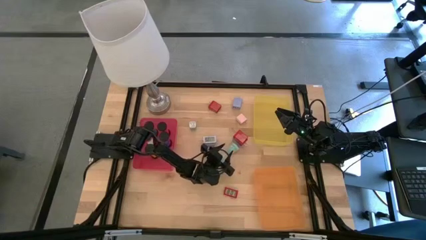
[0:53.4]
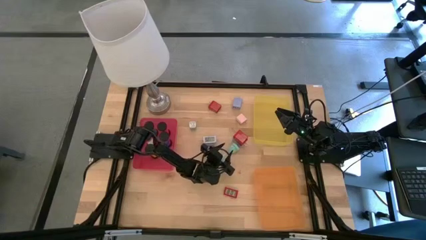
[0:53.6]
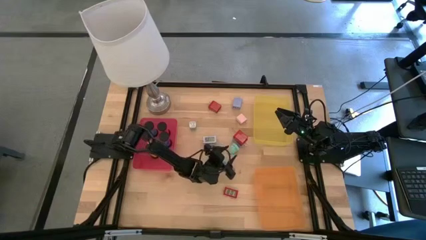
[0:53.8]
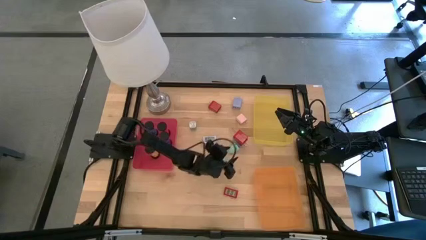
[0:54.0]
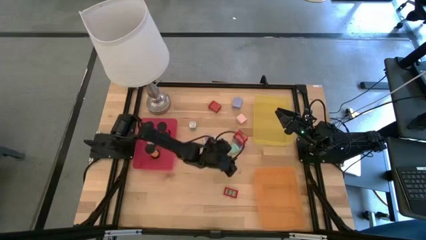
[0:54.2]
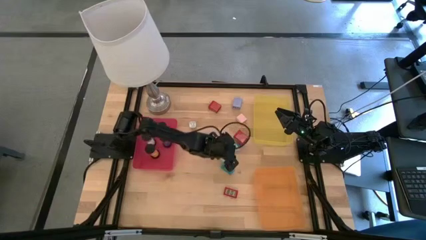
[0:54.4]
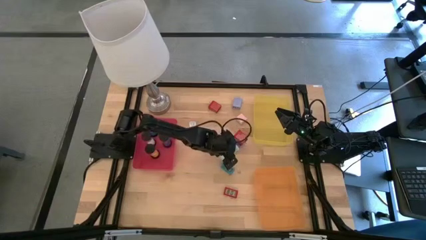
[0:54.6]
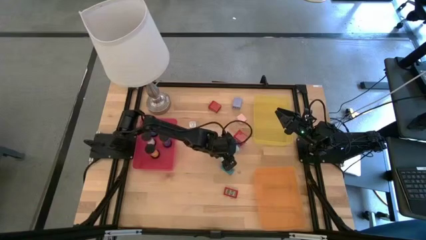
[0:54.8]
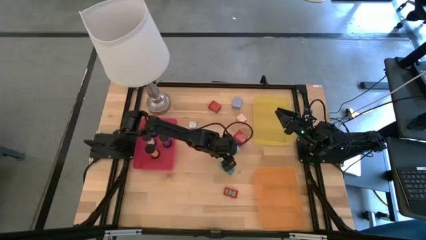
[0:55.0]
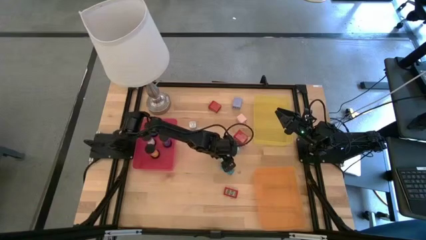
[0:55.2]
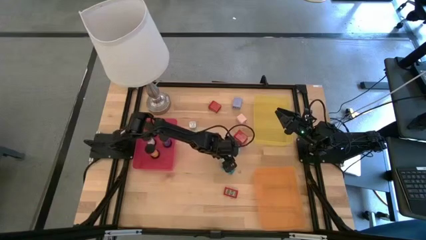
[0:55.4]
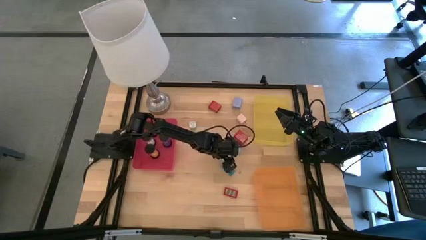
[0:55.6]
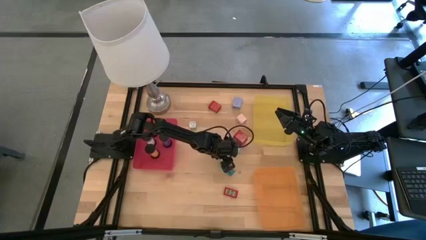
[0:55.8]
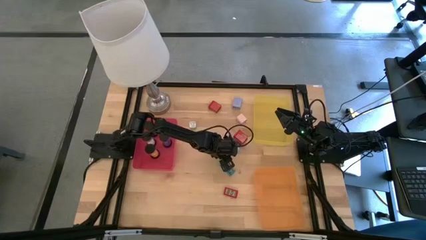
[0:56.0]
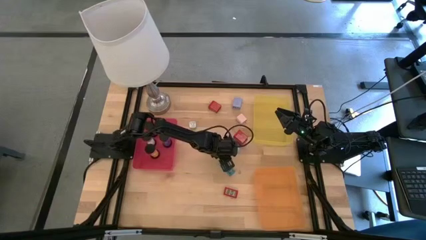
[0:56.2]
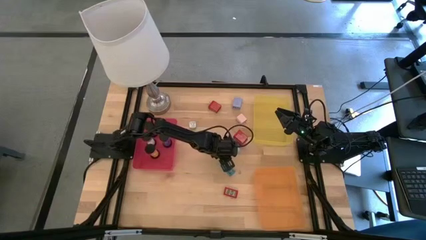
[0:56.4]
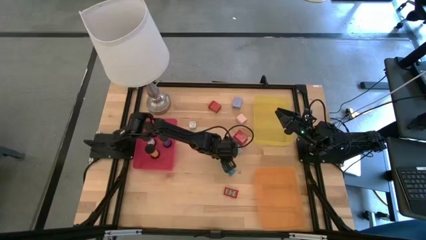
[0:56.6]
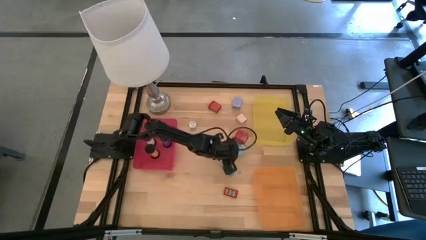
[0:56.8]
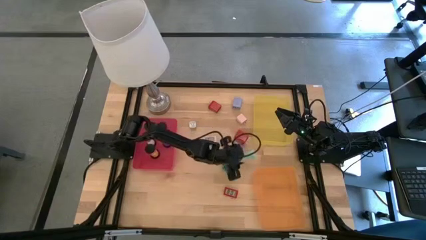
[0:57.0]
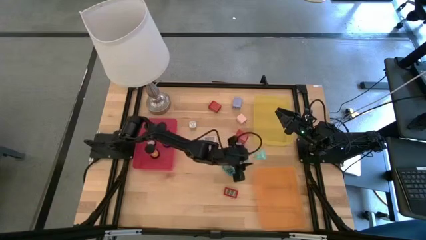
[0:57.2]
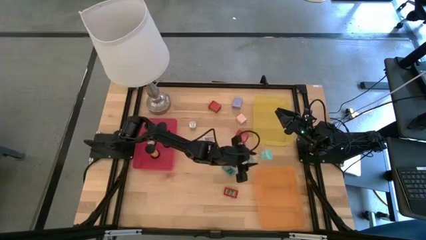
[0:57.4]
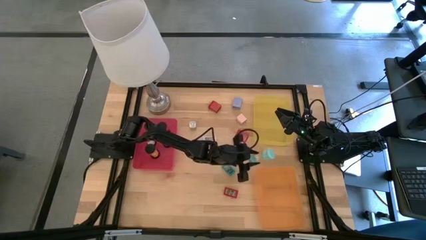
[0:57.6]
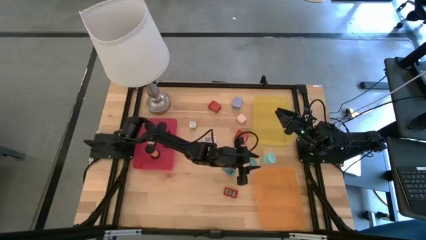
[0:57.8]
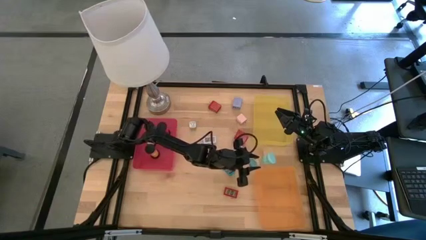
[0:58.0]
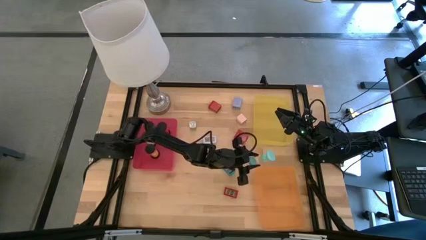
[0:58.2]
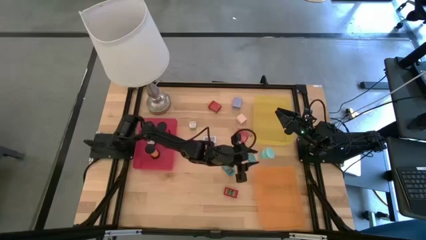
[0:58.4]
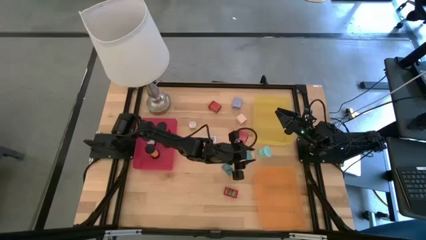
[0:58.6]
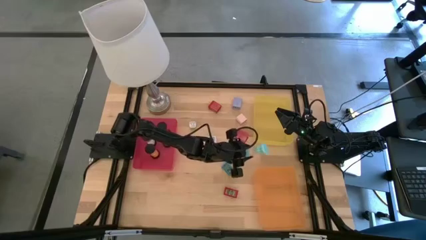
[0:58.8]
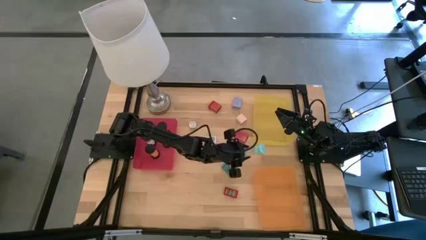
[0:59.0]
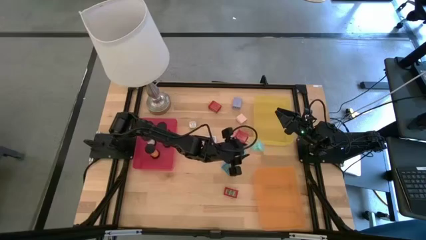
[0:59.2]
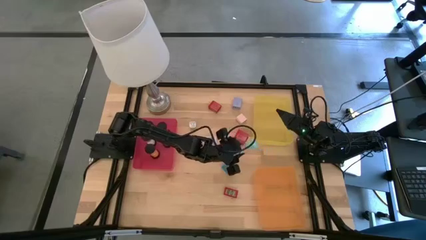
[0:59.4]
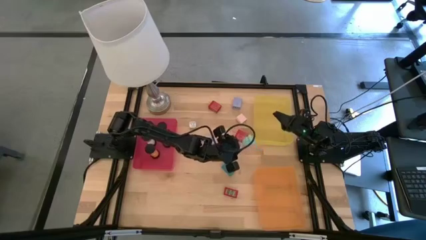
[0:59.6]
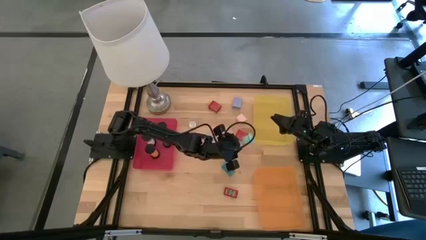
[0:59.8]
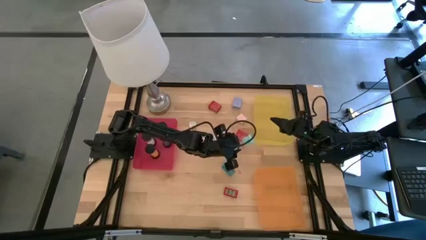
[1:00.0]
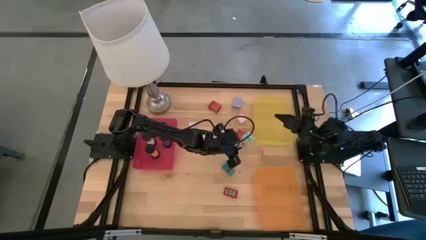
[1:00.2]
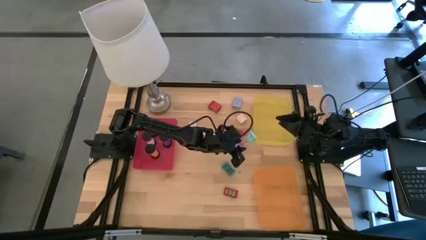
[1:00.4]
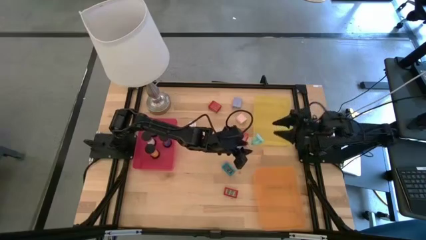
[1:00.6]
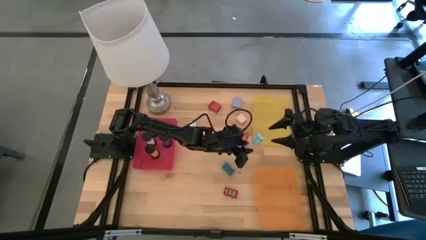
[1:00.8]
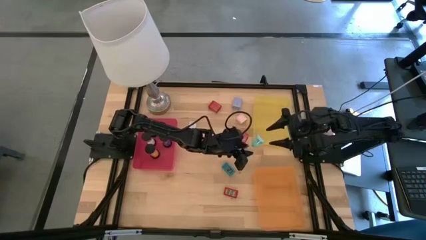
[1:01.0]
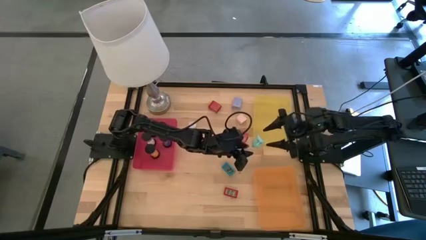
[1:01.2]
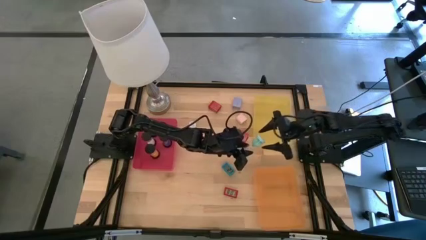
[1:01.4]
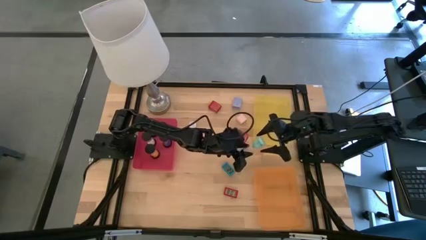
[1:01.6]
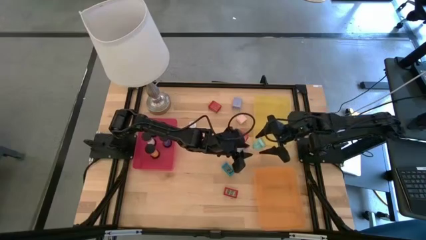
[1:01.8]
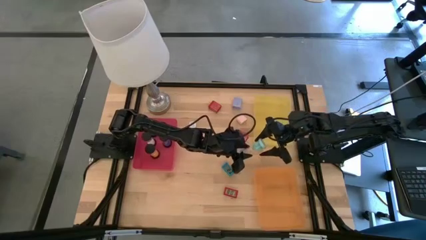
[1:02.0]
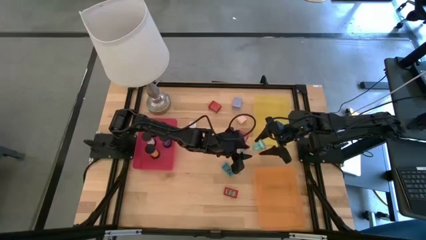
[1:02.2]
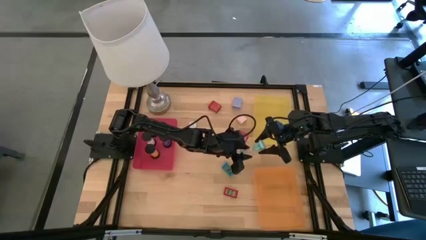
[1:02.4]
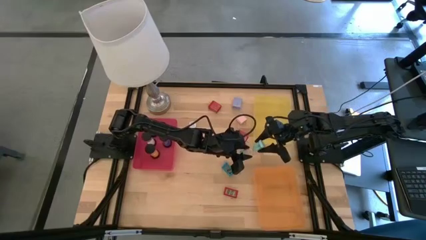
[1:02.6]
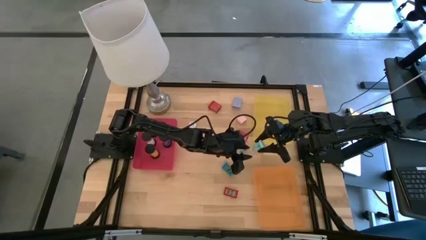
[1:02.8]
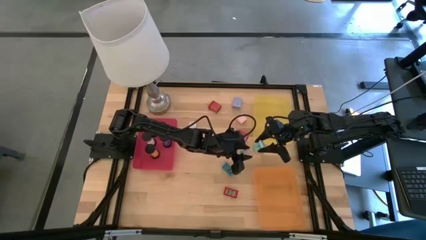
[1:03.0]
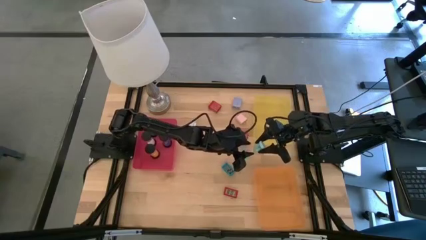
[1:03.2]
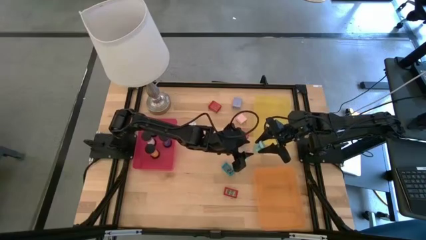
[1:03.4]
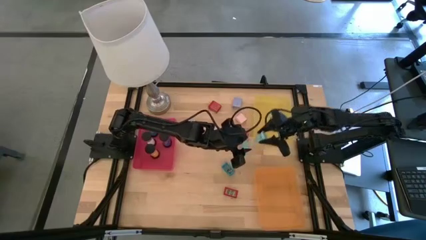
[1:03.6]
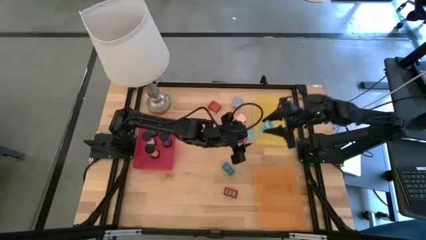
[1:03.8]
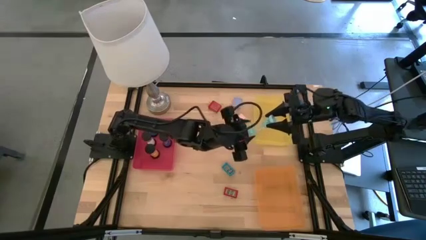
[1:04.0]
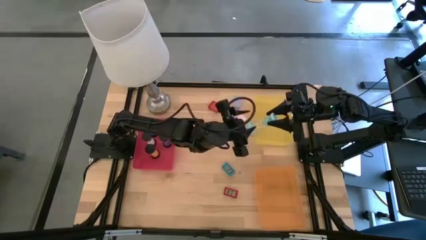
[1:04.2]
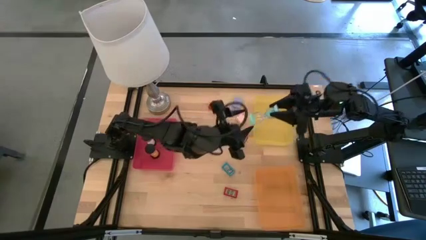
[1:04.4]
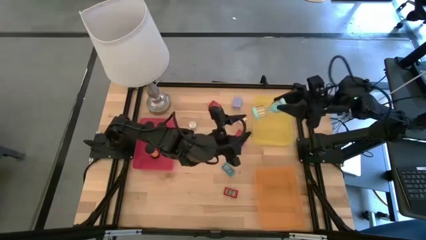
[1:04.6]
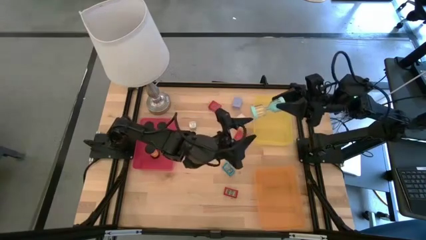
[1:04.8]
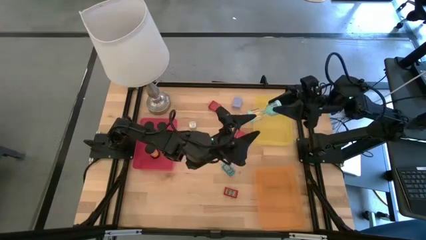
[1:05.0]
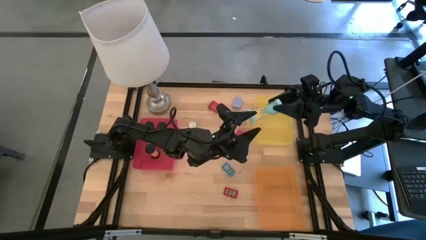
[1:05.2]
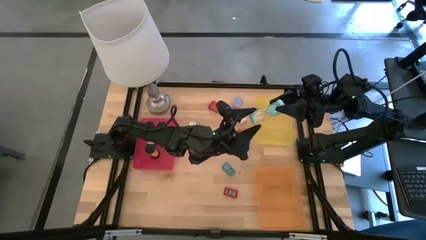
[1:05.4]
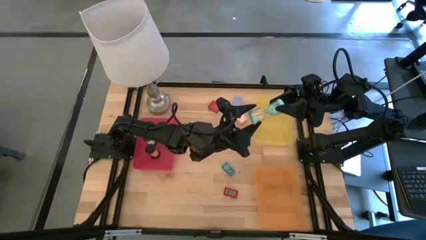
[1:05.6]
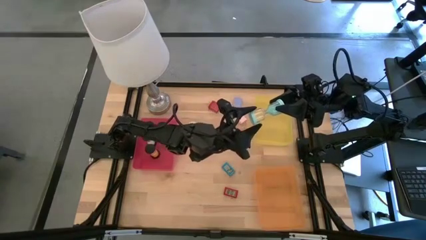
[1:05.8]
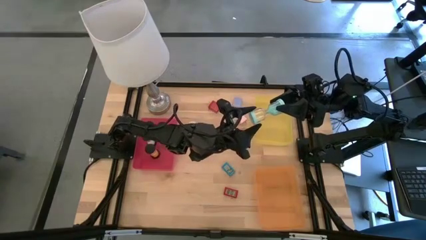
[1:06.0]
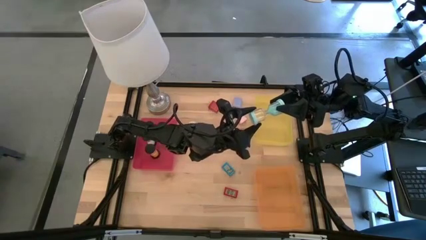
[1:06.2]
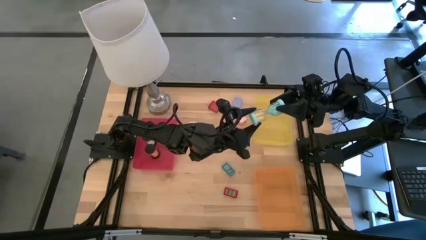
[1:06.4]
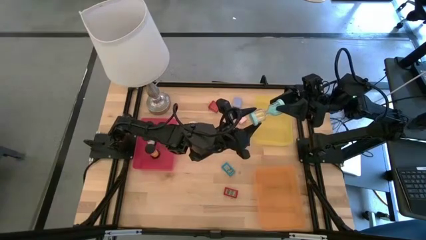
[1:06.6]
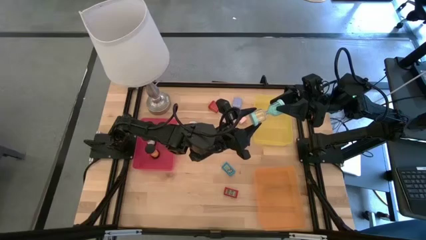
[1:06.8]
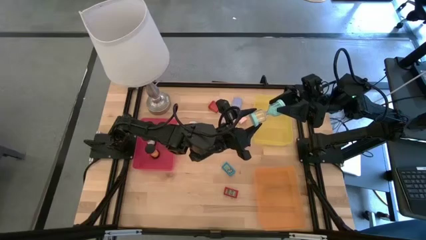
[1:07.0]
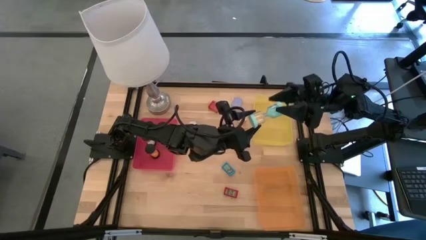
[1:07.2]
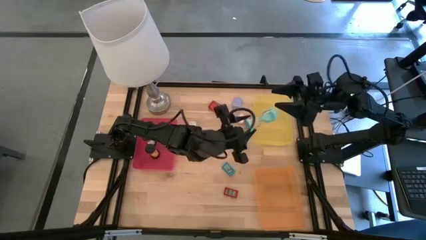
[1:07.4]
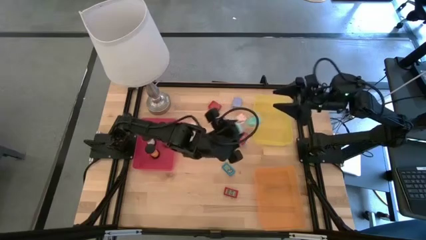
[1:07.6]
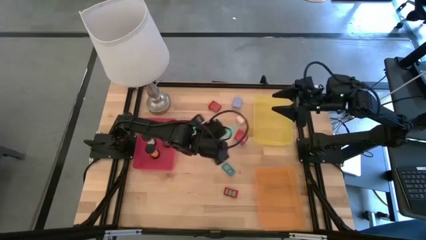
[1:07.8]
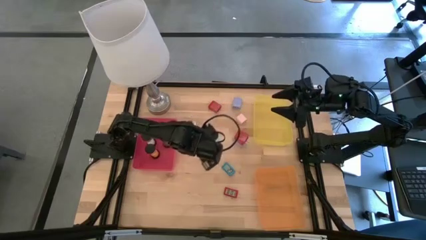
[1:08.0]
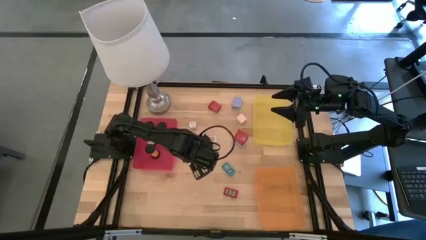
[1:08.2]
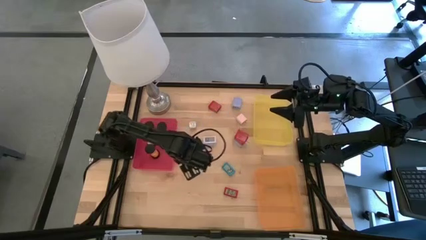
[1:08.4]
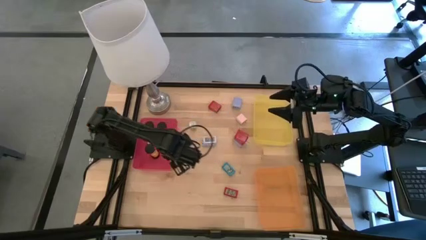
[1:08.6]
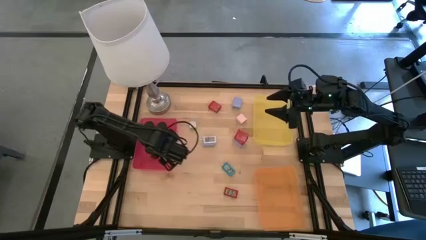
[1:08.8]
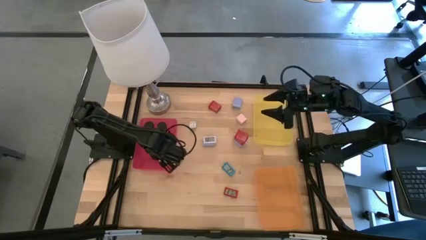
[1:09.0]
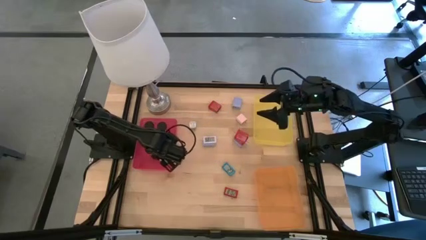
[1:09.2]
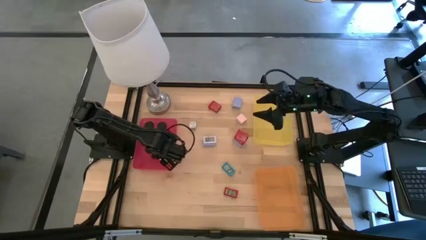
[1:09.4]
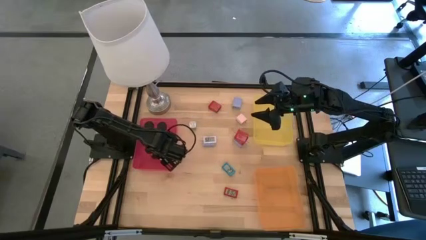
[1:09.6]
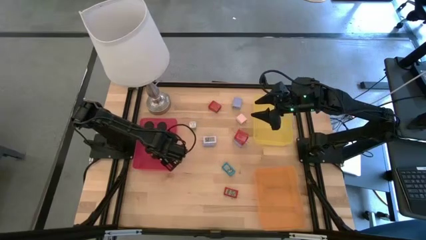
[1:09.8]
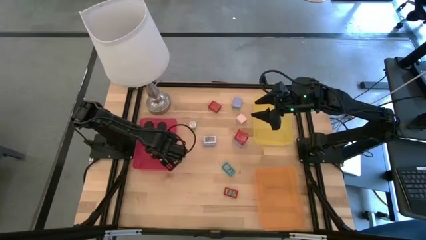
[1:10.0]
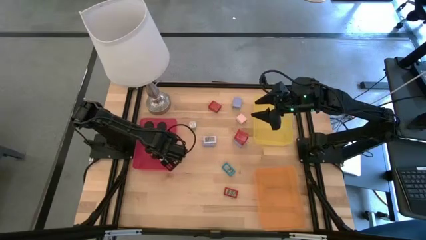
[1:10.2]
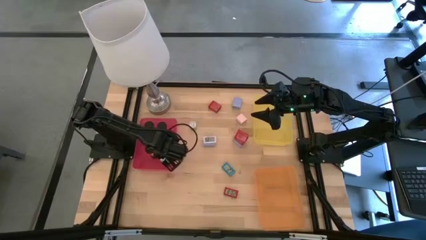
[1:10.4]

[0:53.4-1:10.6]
Task: Pick & Place Office items
Put the light blue hourglass timer into the red bin
